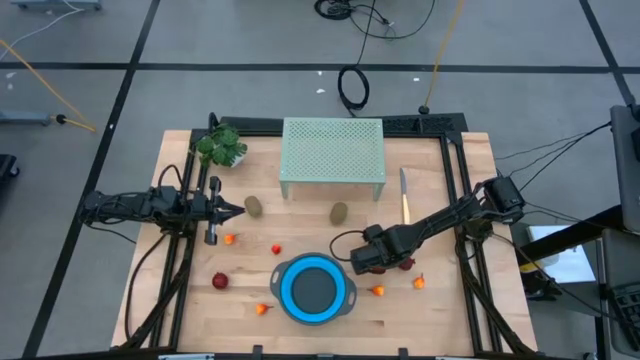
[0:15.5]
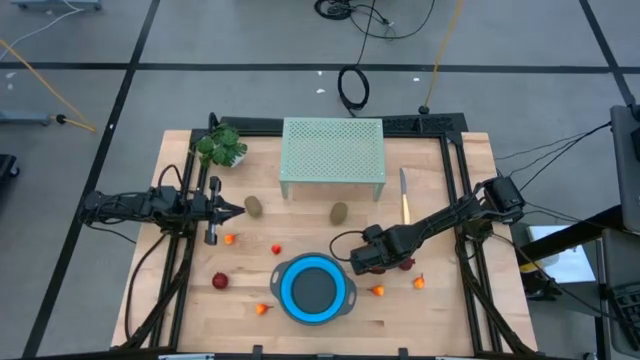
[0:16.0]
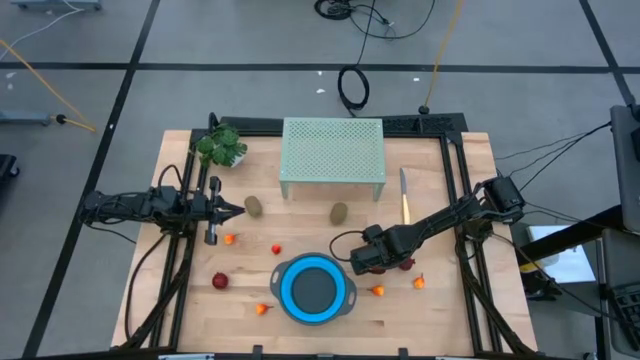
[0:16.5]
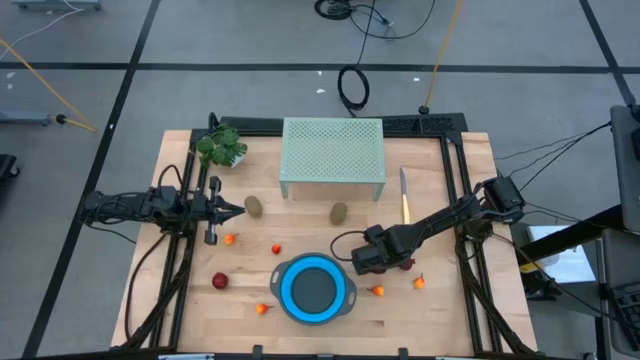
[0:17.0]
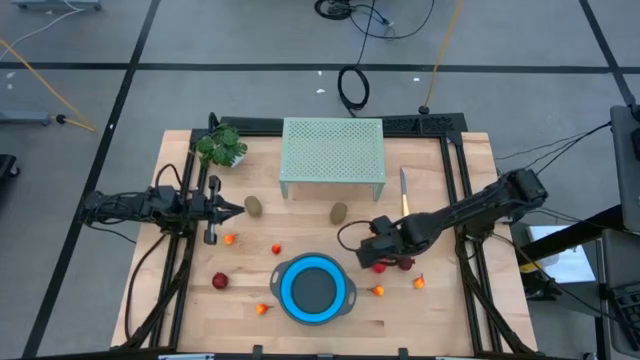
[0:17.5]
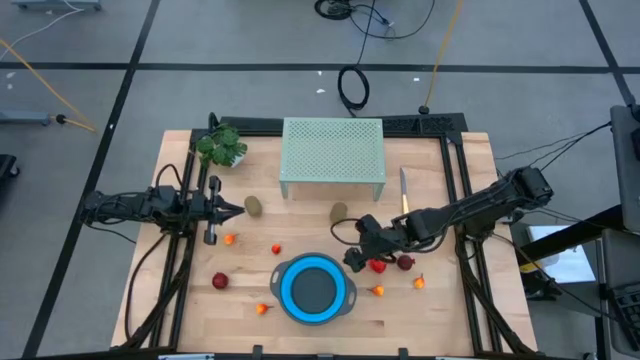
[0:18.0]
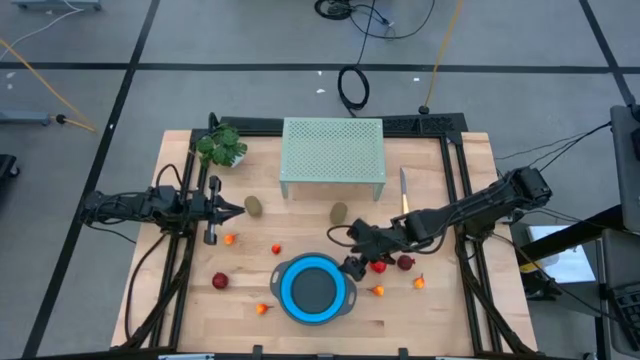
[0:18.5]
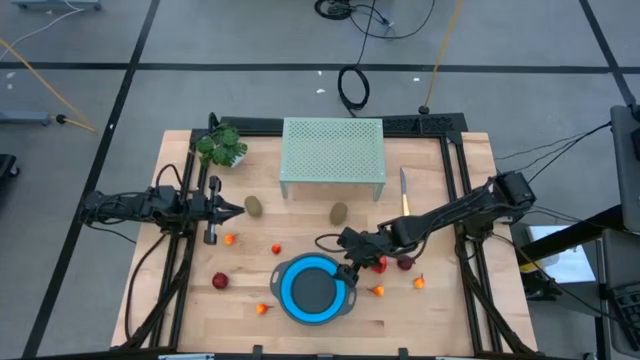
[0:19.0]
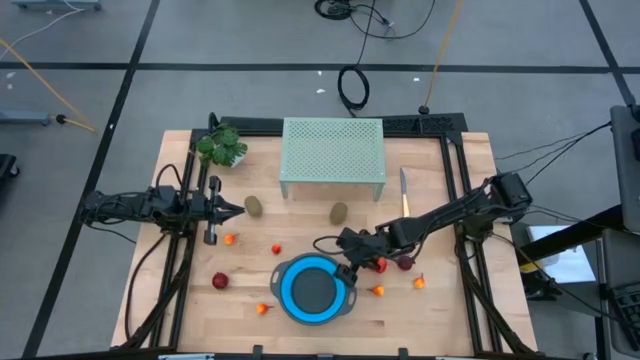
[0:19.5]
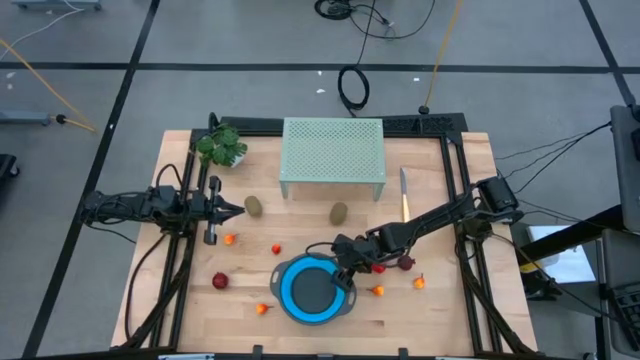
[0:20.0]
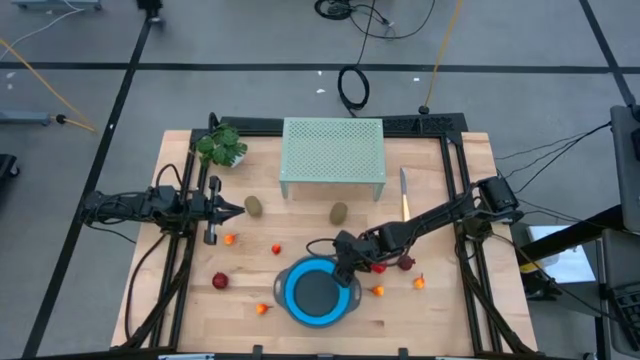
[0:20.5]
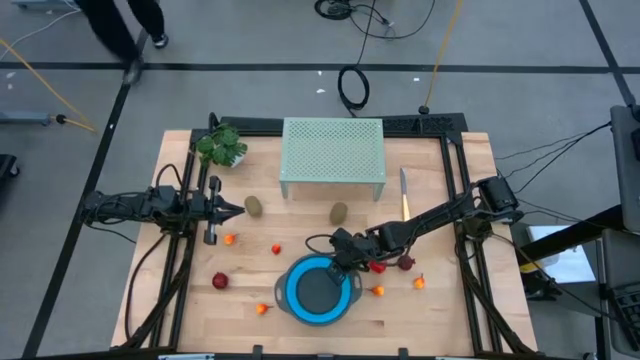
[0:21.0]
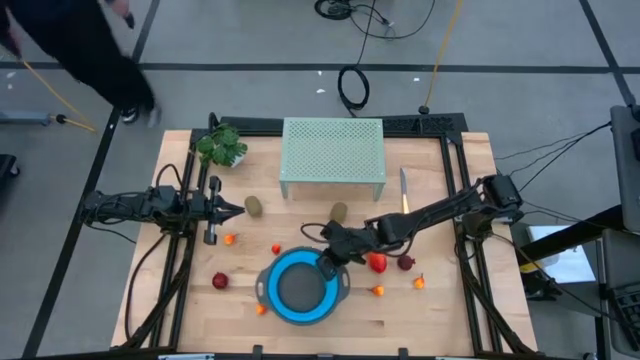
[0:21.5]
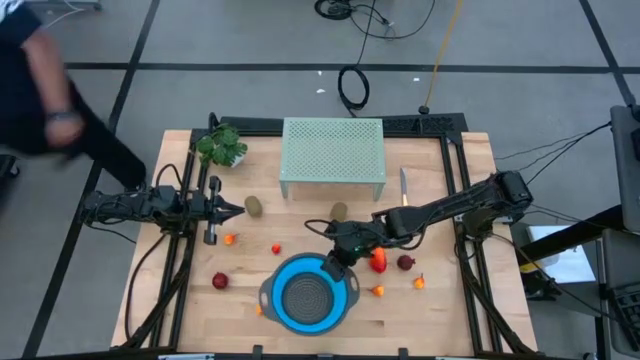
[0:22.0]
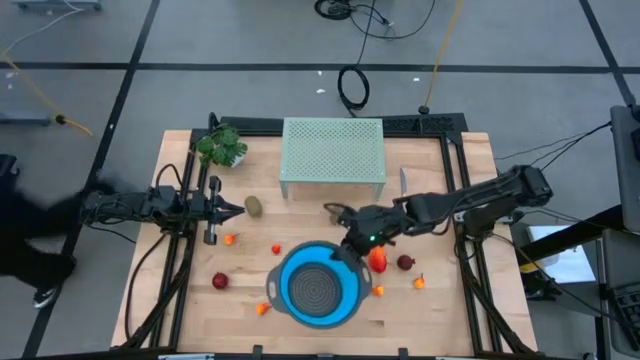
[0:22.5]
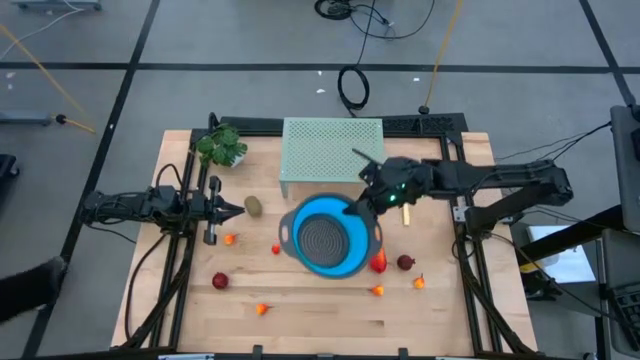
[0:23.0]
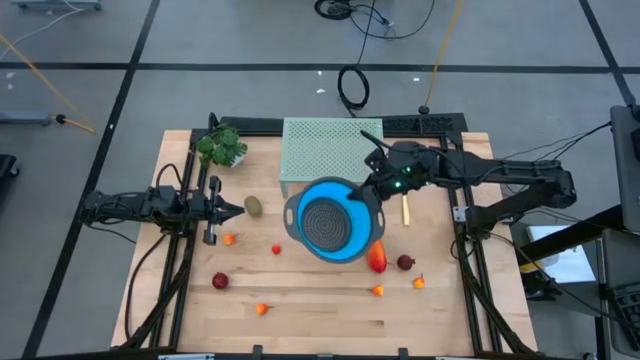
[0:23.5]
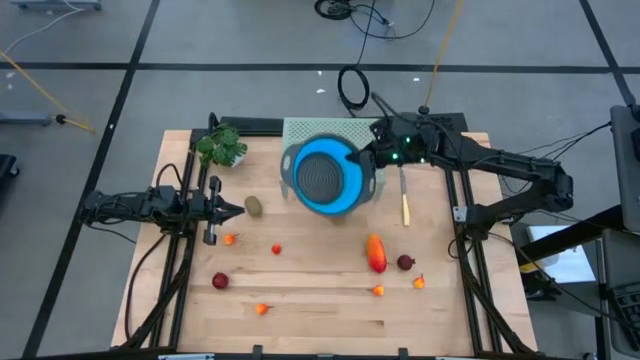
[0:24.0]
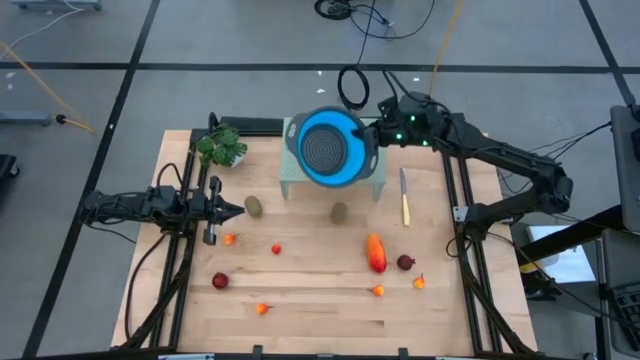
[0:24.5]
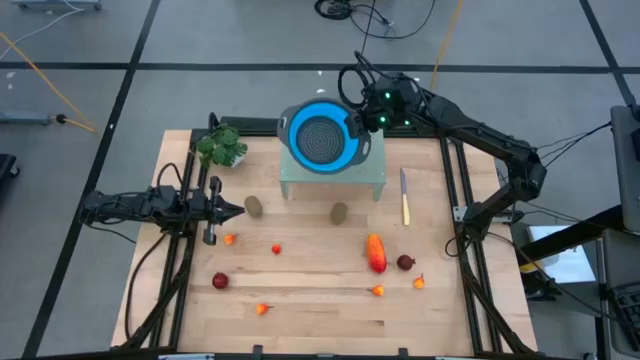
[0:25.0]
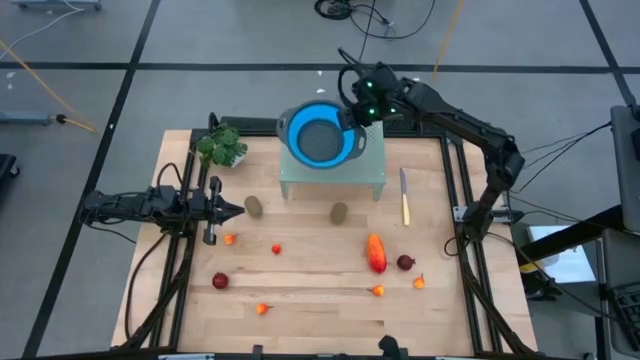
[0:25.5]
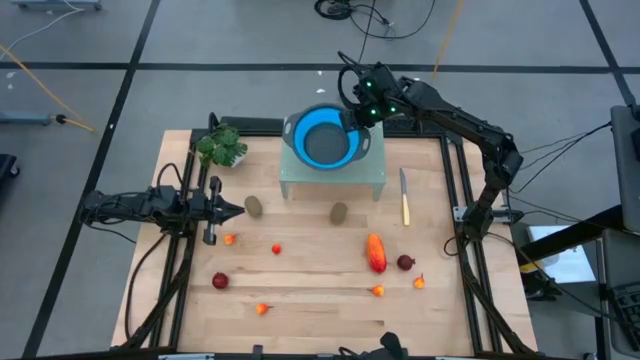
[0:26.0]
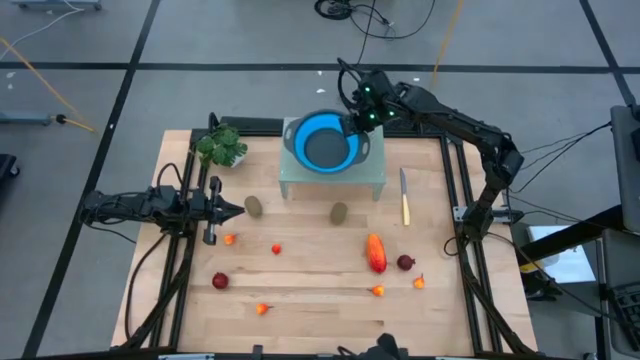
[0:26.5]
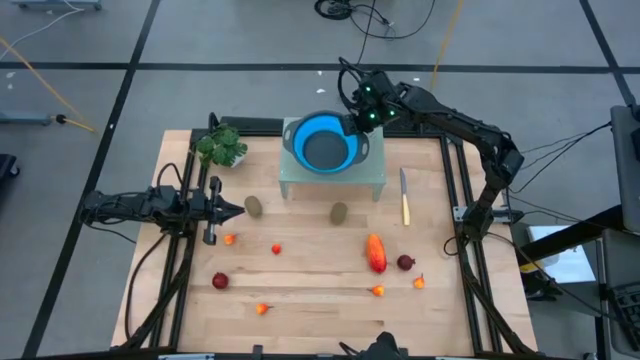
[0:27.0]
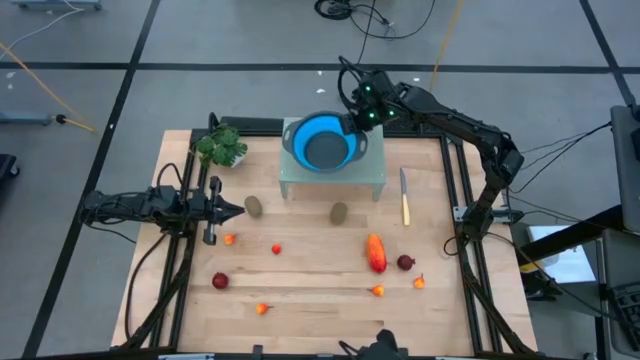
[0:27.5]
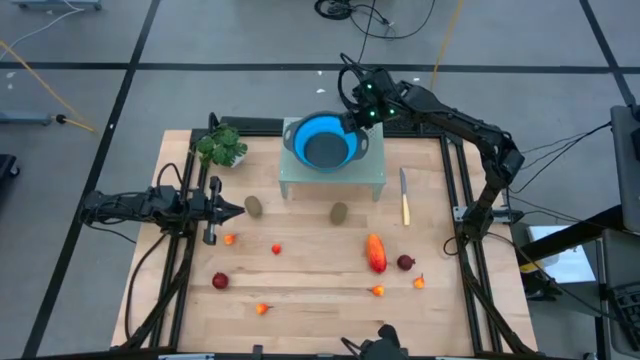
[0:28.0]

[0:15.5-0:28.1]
Task: Pick & Place Fruit
Put the colander on the shelf

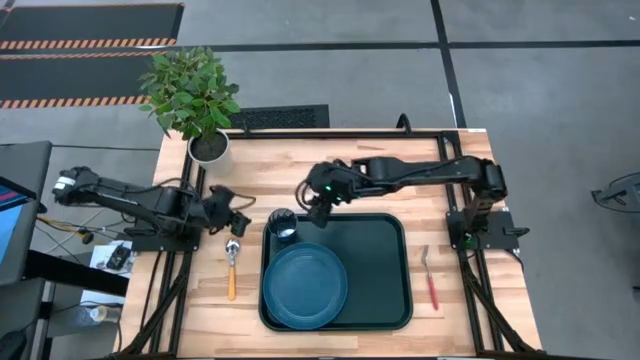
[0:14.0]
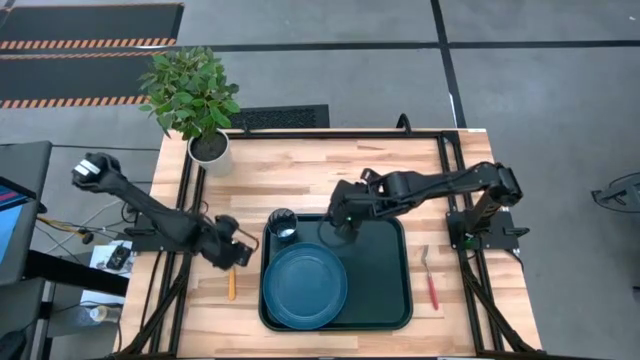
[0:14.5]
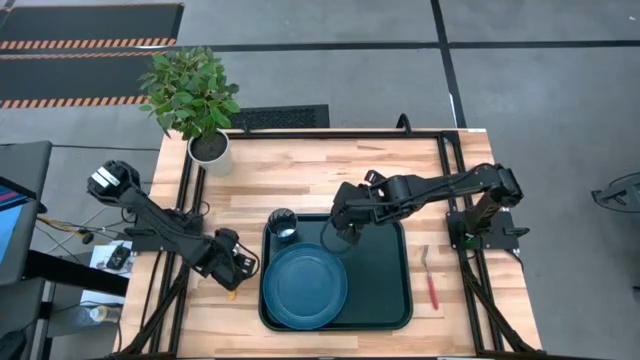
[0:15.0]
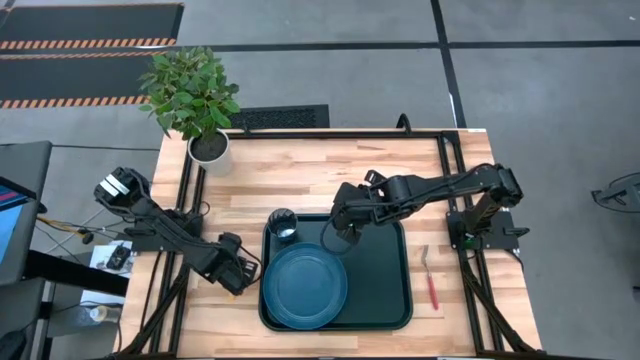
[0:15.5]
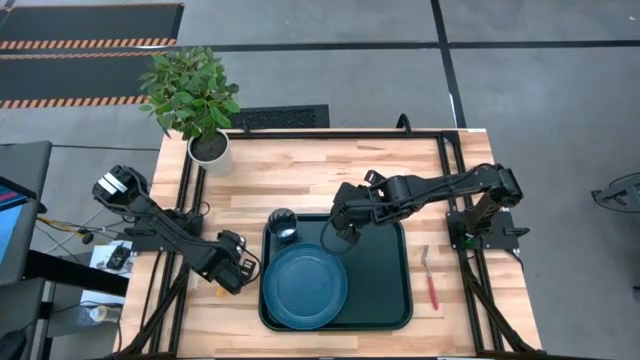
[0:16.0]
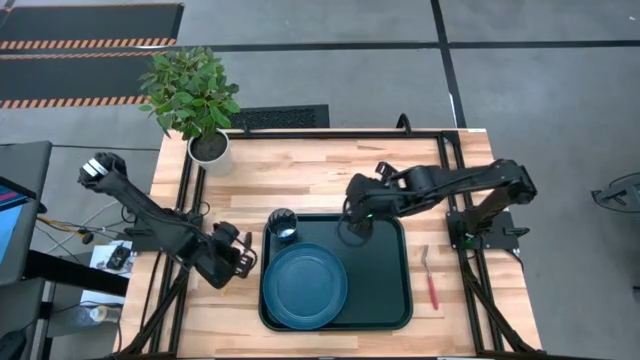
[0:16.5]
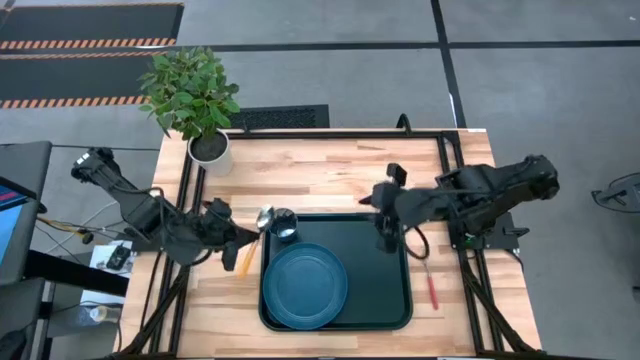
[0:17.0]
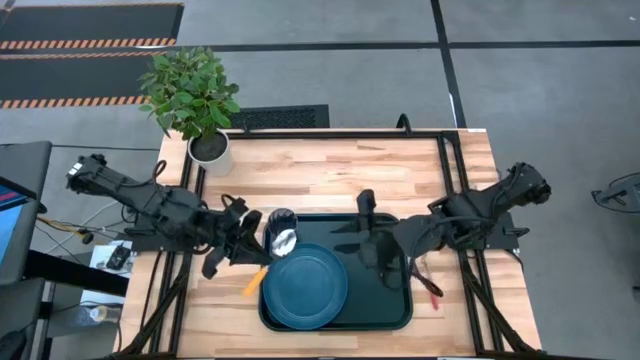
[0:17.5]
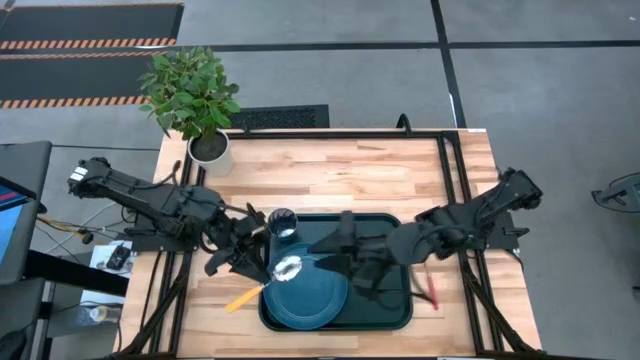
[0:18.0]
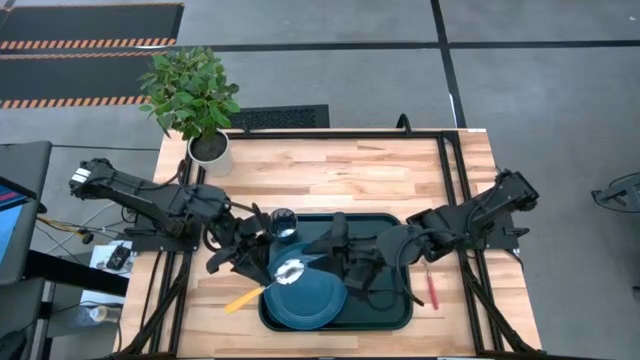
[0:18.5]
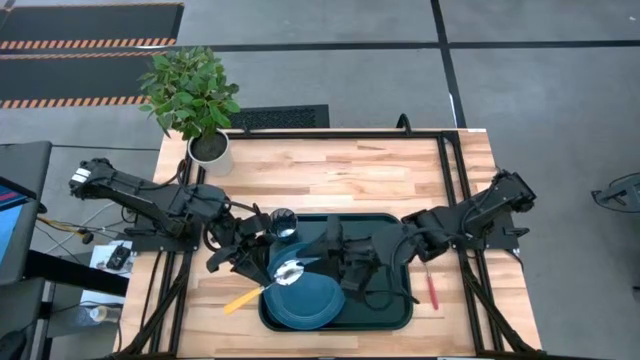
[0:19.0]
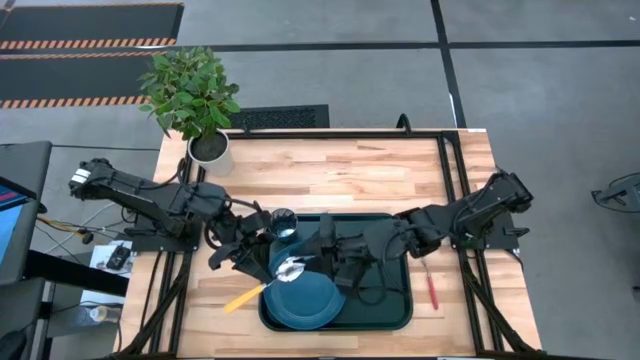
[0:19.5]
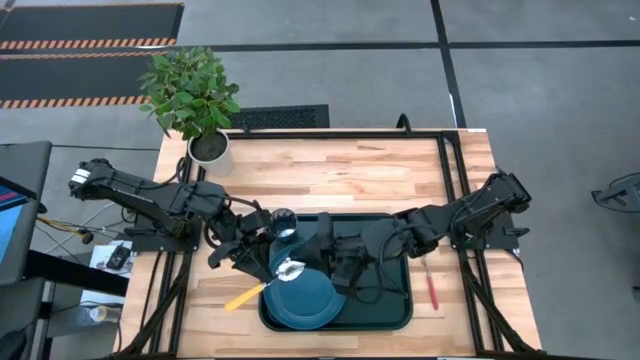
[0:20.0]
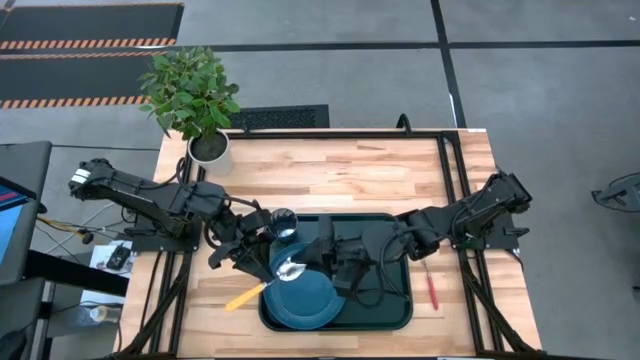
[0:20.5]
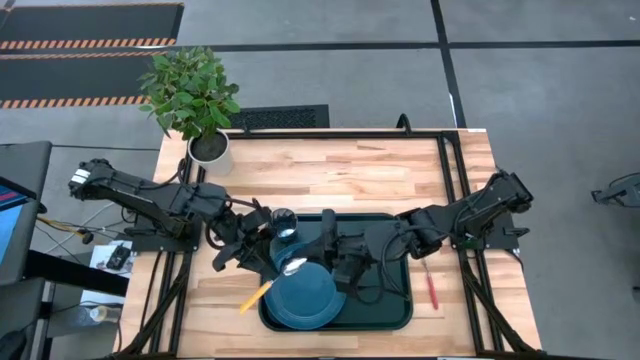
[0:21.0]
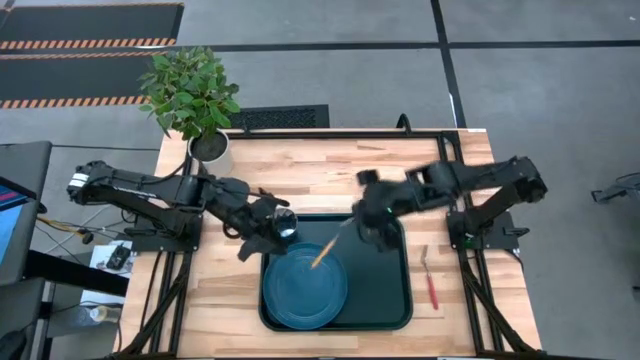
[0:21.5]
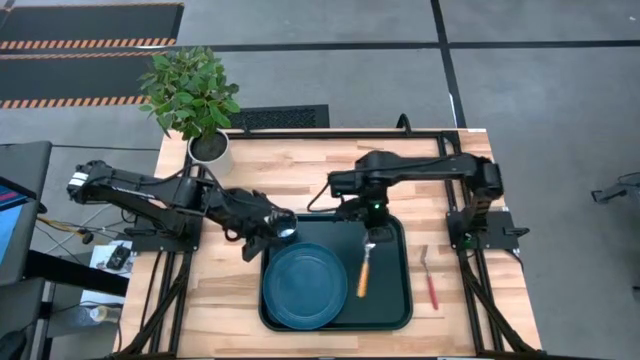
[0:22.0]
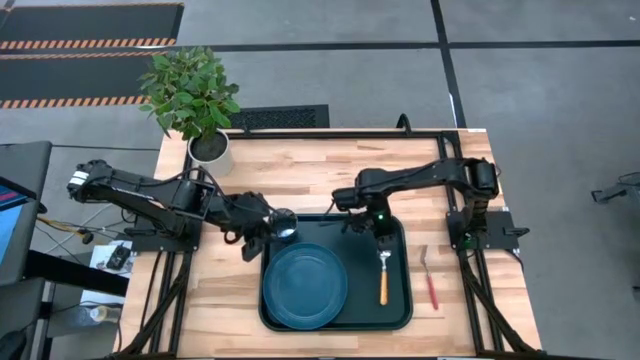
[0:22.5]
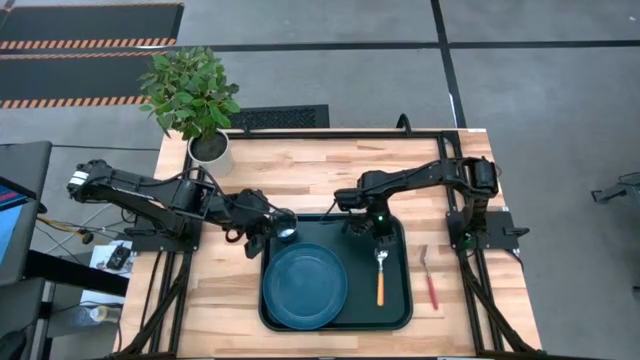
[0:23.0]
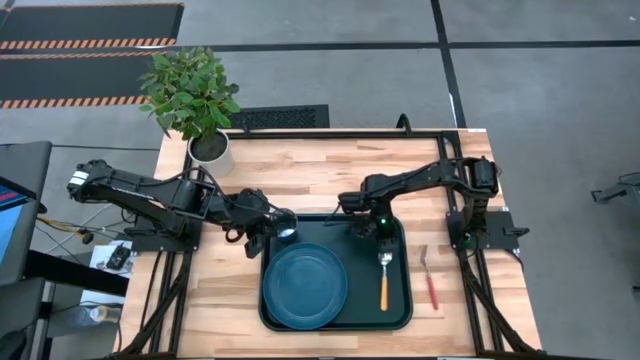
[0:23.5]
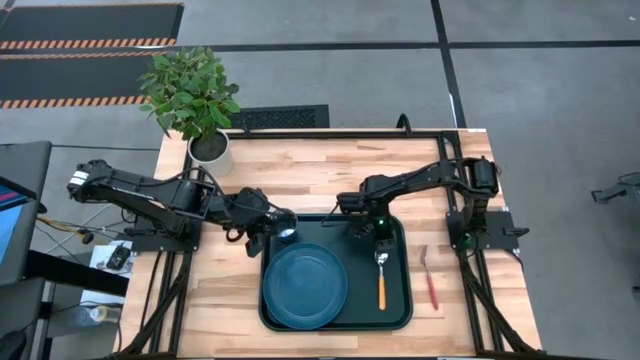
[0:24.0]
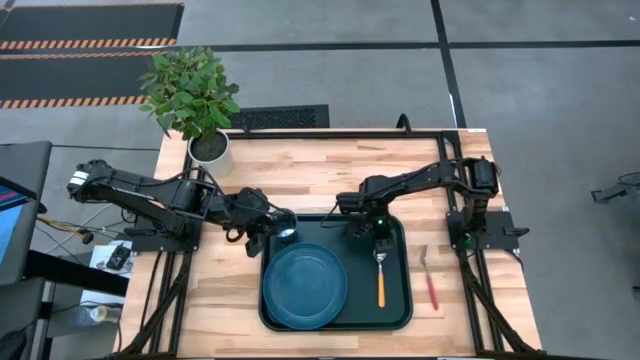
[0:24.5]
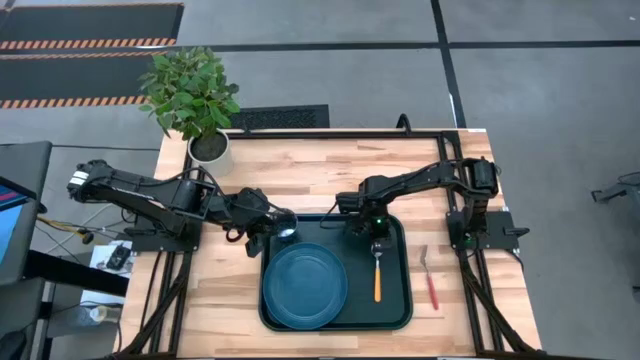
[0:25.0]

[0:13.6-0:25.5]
Task: Pick and place plate/cup/fork/spoon on tray
Put the yellow spoon on the black serving tray to the right of the blue plate
